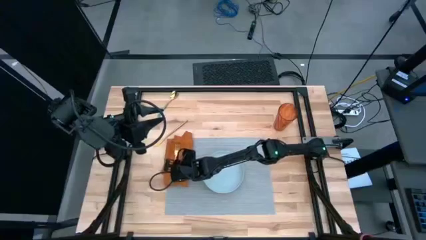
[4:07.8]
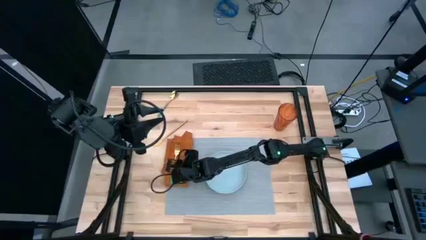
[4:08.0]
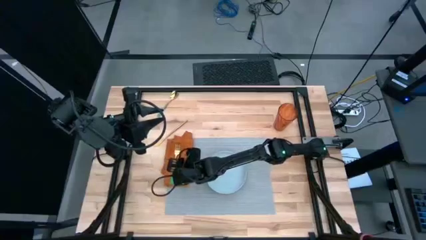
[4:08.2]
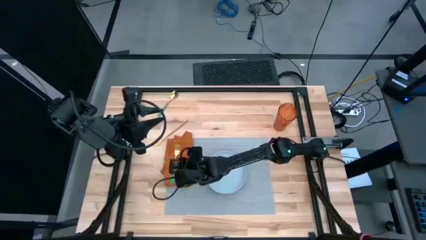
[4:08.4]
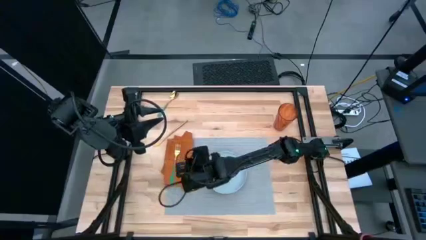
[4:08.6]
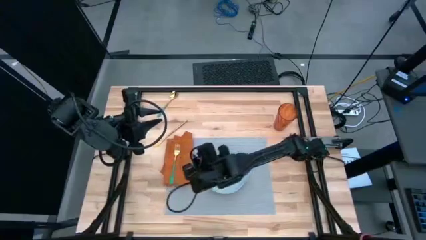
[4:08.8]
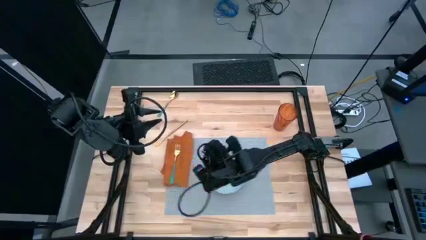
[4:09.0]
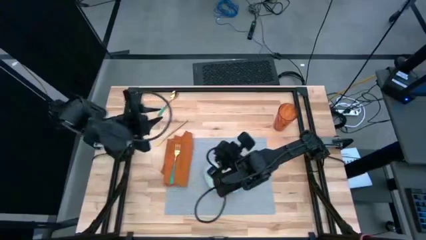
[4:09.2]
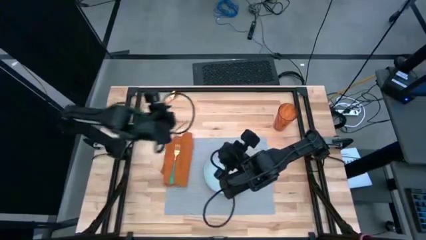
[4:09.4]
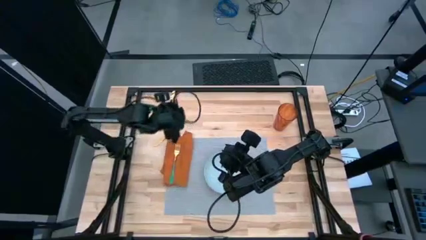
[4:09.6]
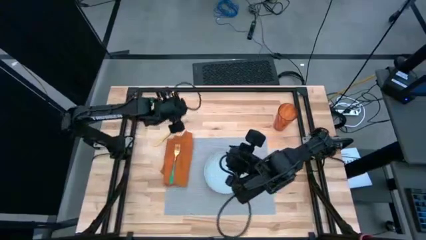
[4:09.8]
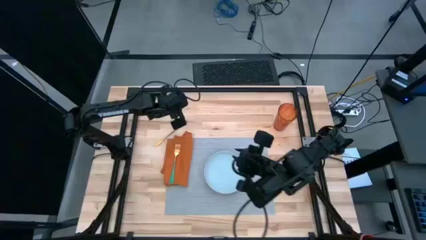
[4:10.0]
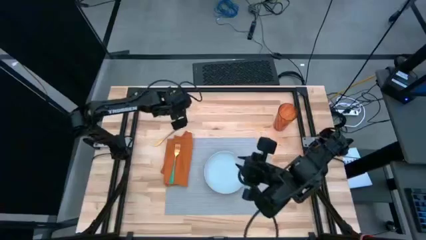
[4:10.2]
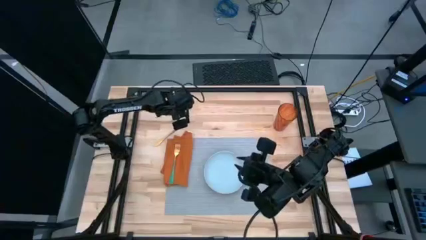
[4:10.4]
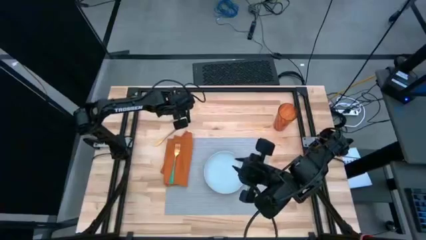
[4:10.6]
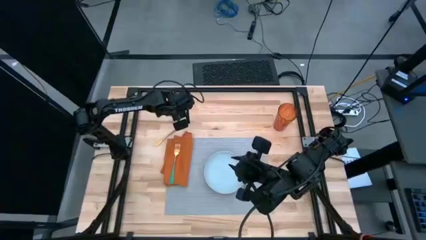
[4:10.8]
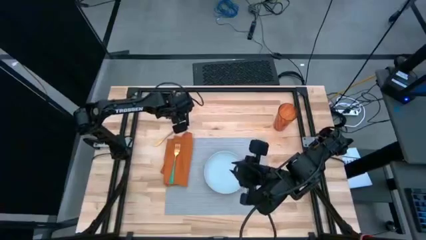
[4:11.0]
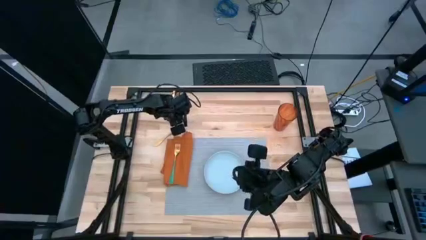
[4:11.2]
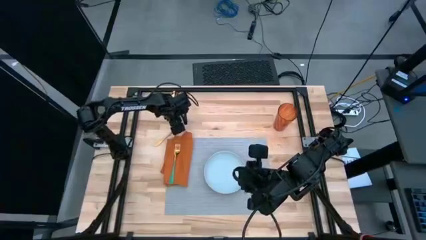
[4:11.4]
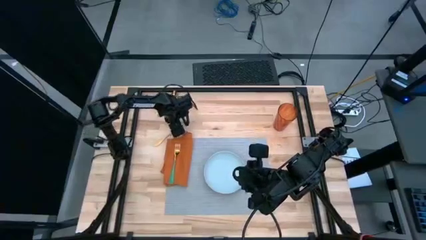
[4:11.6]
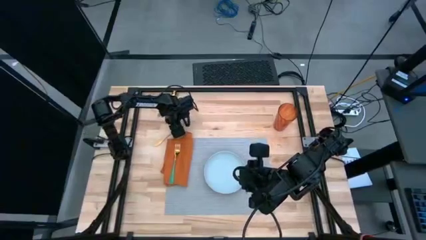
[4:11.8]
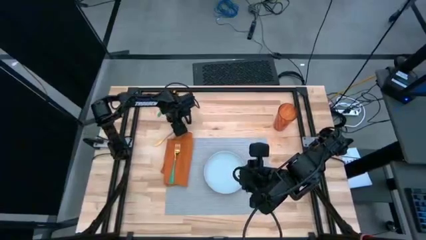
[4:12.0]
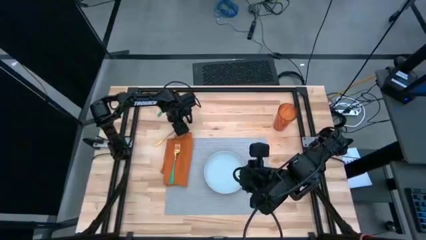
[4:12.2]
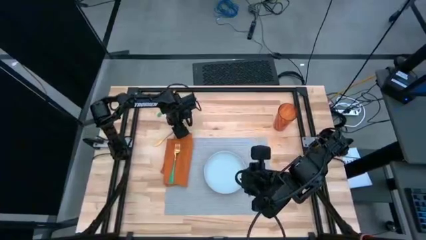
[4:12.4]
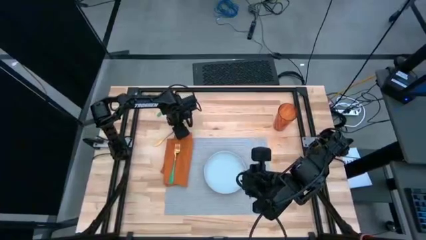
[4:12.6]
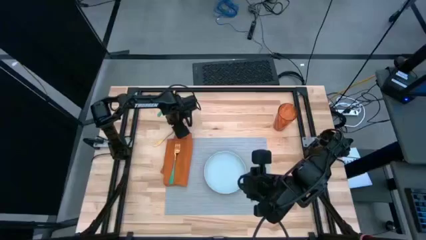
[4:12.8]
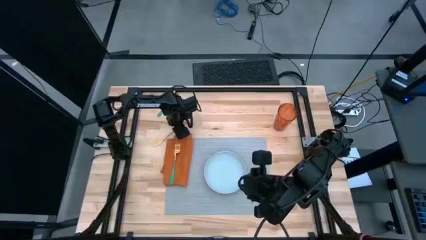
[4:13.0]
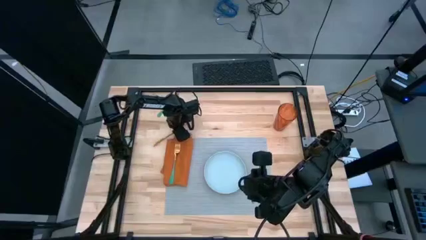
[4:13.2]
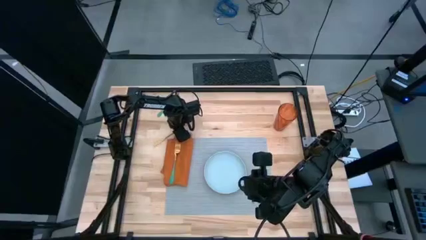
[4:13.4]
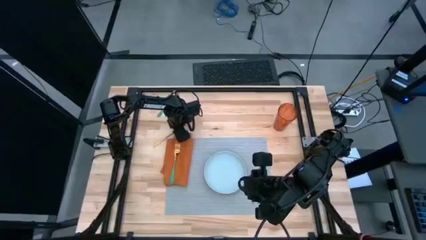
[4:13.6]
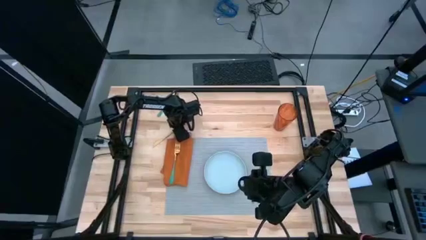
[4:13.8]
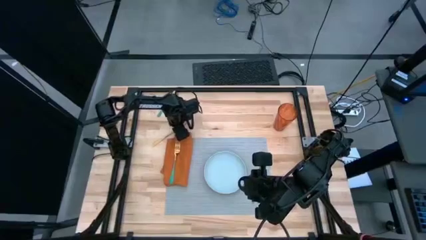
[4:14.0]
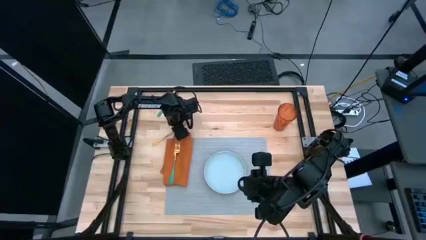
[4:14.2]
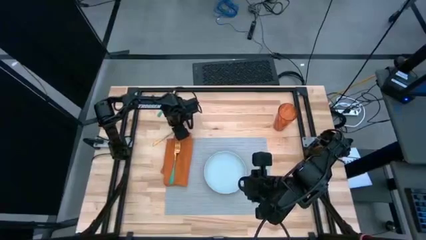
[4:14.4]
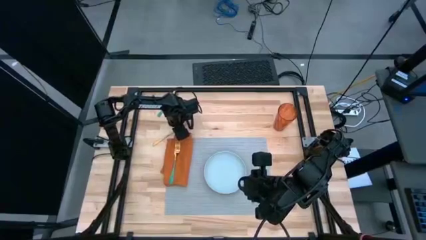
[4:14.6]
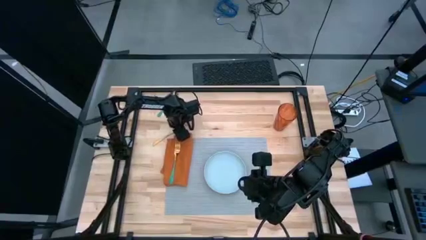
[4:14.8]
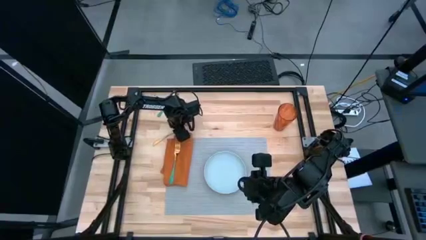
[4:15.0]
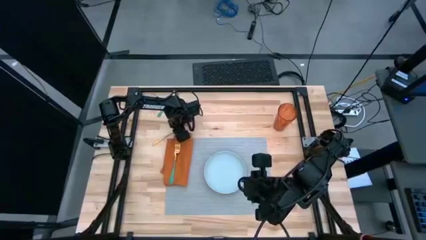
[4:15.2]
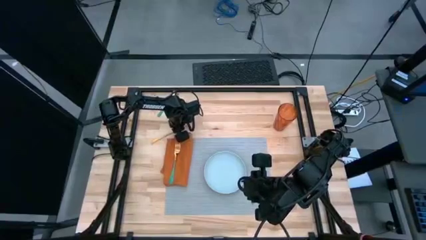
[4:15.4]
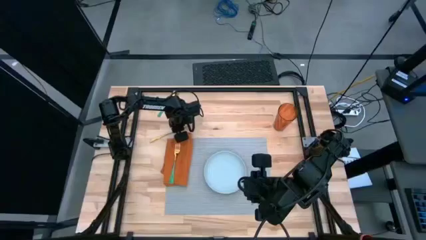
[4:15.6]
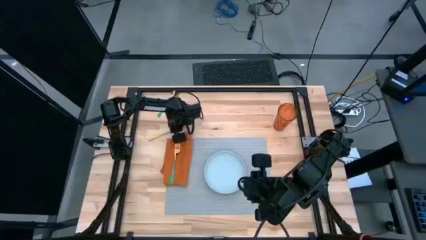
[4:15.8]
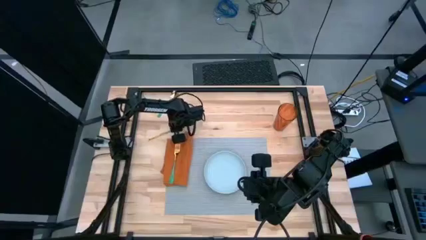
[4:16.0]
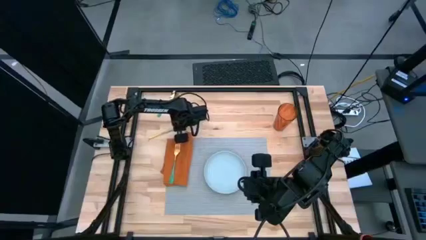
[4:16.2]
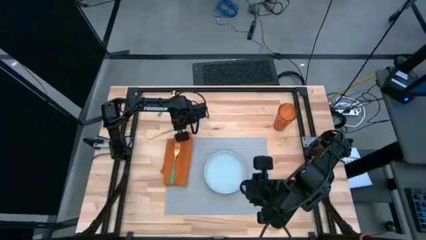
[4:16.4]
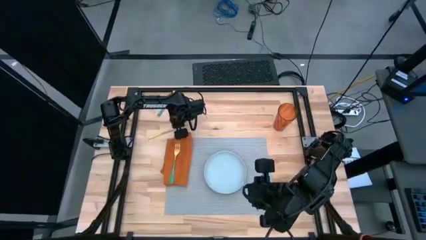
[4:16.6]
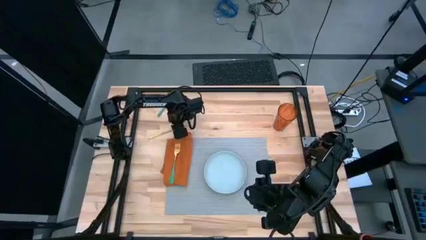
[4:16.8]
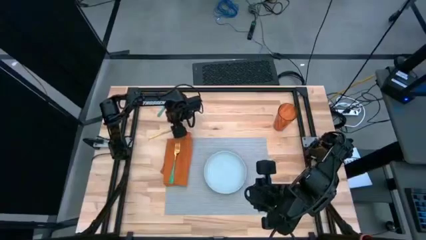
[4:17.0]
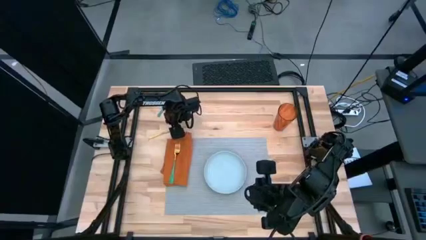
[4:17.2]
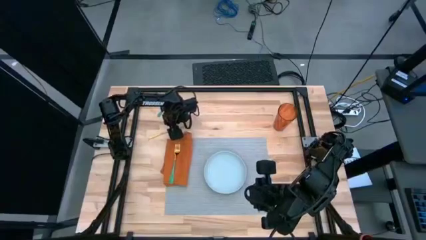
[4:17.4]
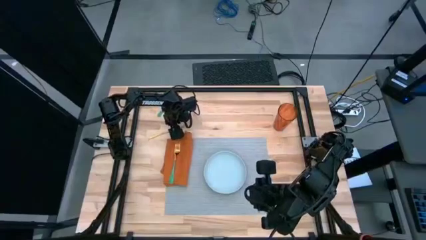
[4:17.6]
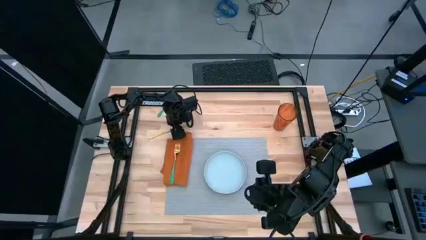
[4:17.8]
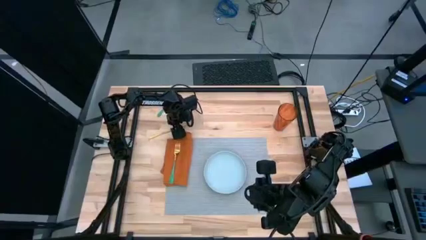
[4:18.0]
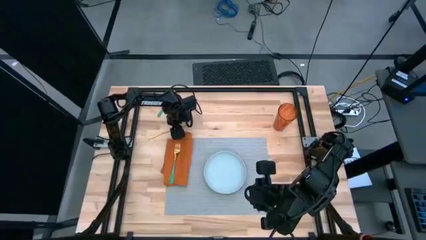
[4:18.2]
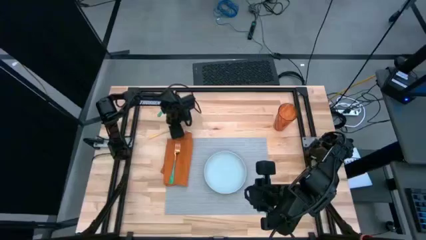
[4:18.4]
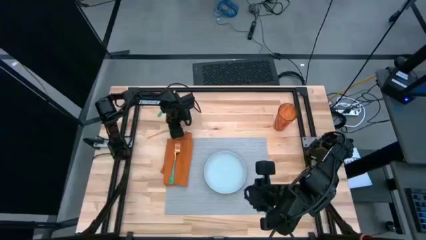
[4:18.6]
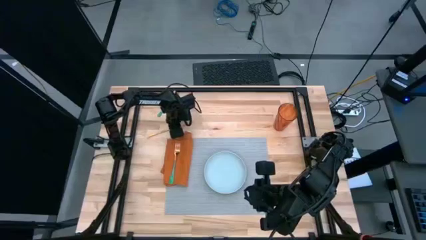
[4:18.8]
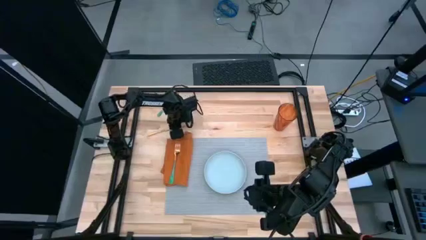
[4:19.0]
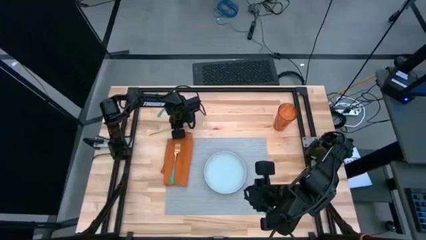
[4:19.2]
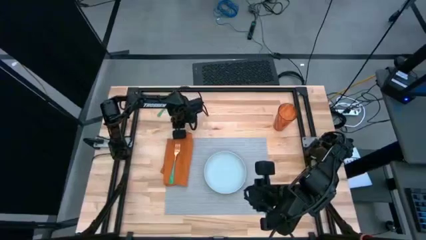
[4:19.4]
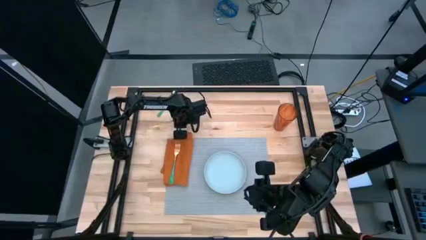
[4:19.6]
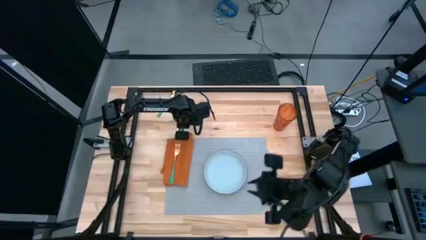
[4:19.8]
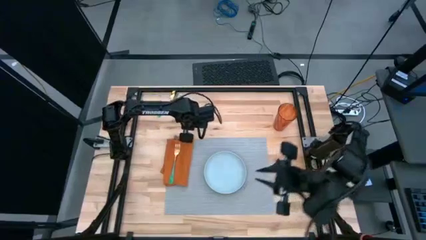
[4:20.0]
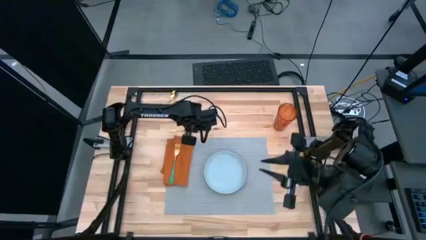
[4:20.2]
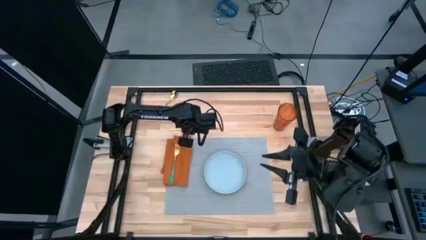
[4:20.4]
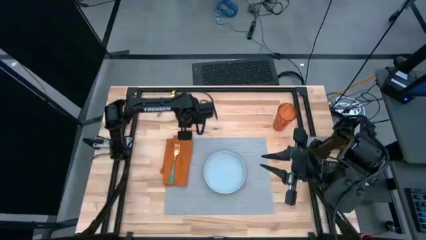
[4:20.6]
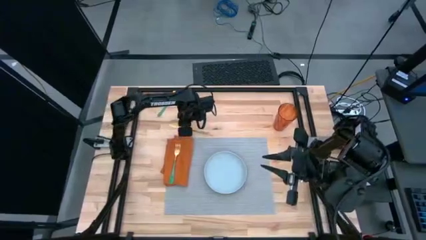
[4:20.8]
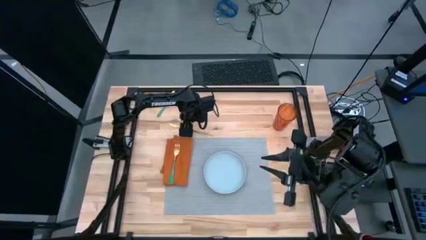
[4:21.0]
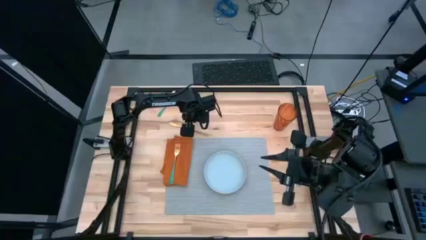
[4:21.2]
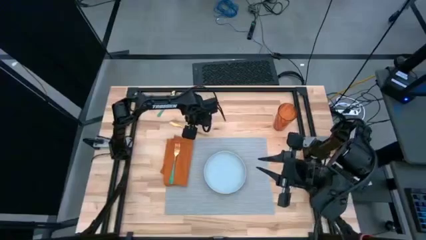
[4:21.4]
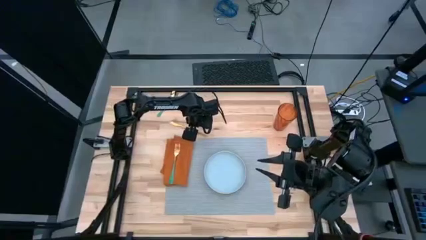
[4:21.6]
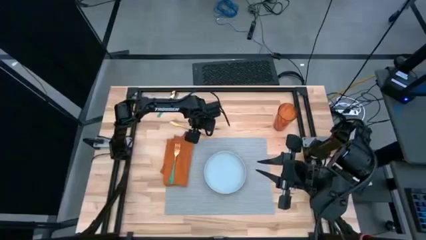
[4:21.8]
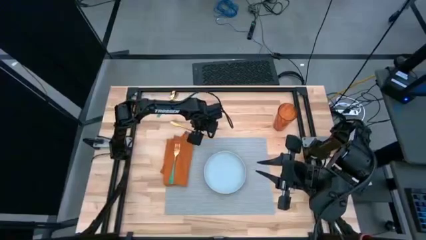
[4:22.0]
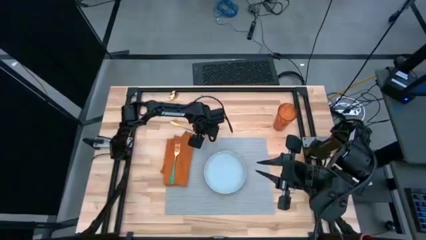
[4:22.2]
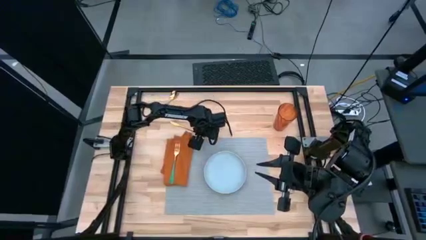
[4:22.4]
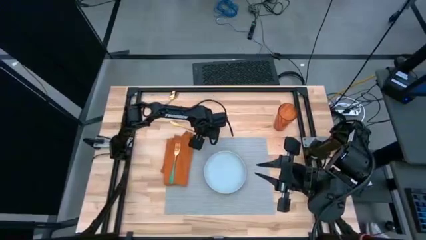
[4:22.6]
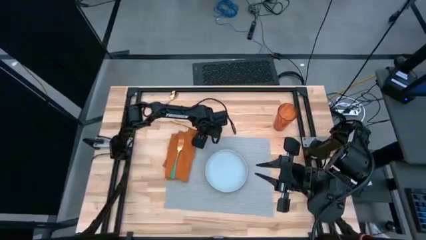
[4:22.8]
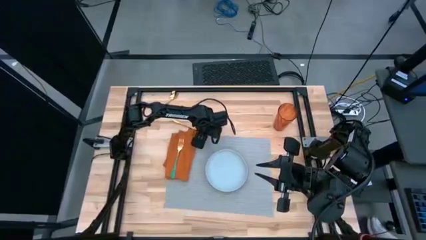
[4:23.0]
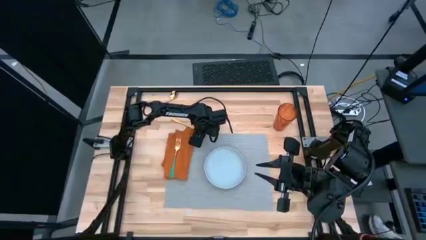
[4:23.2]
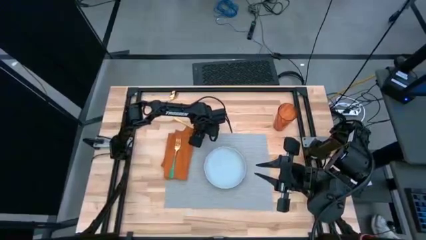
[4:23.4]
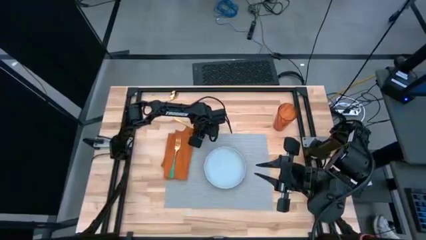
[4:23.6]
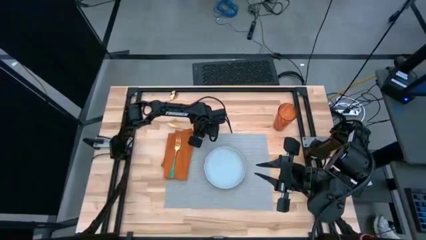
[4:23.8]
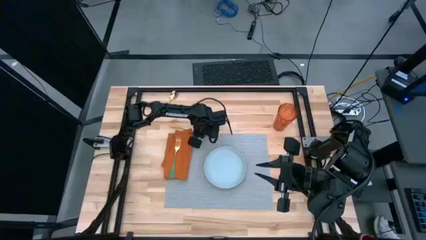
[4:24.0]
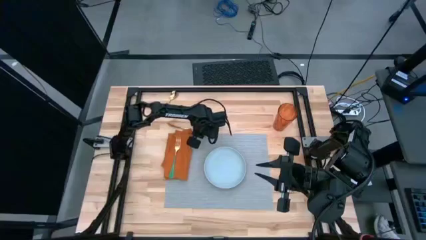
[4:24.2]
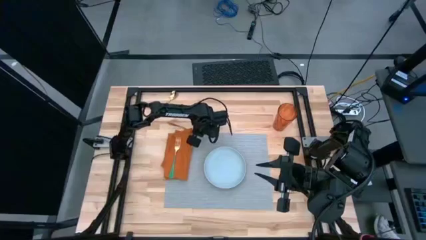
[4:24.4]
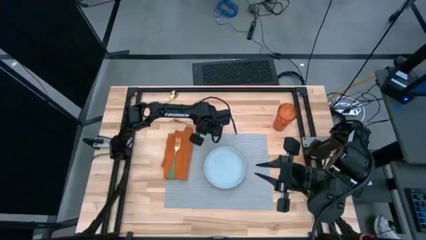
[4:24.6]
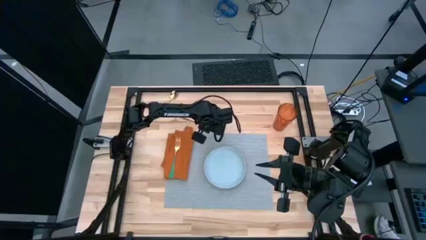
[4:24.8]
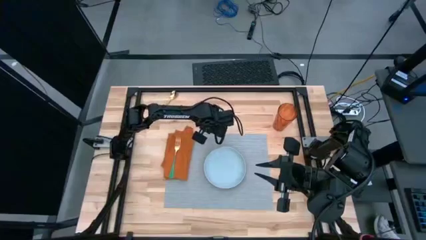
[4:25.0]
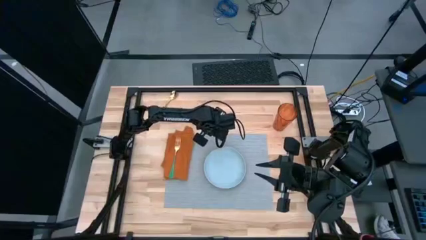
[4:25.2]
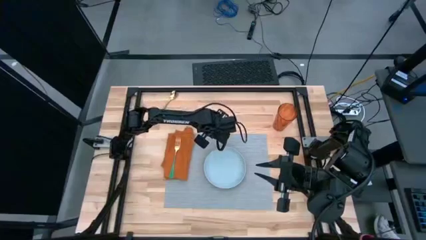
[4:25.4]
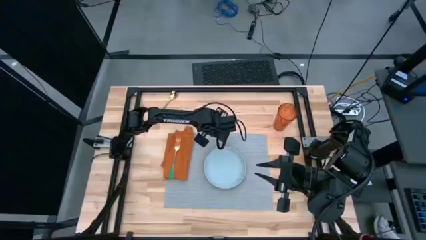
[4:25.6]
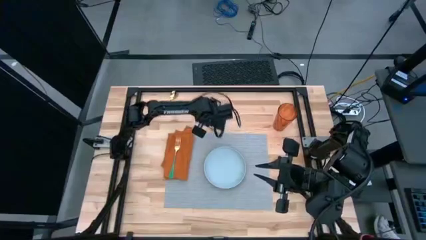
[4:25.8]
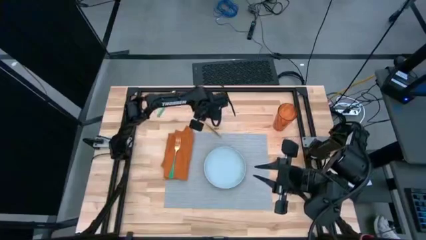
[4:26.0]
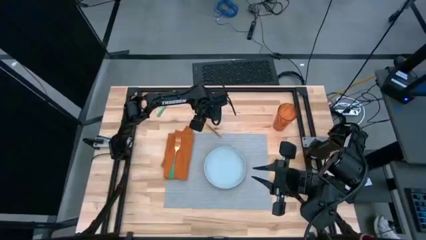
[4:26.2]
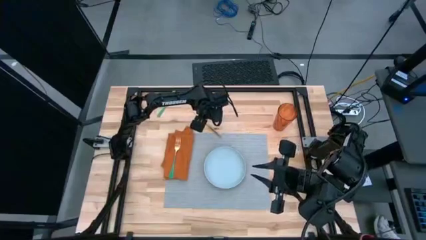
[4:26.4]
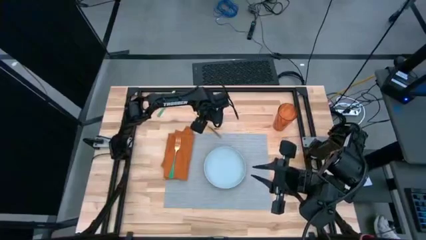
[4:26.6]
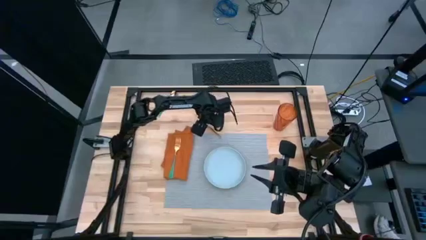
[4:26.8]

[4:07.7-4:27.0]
Task: Set table place
Put the gold table knife on the gray table mat to the right of the blue plate
